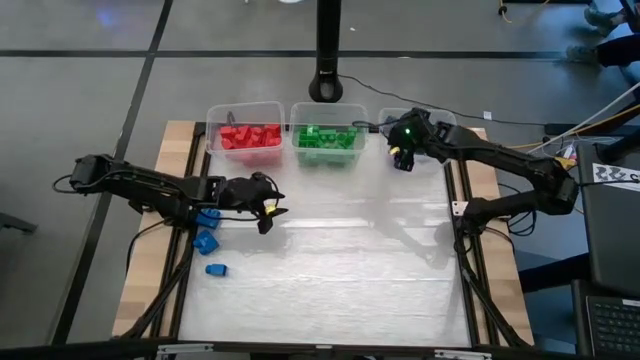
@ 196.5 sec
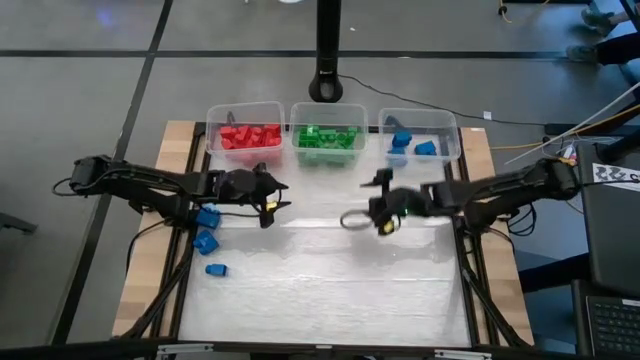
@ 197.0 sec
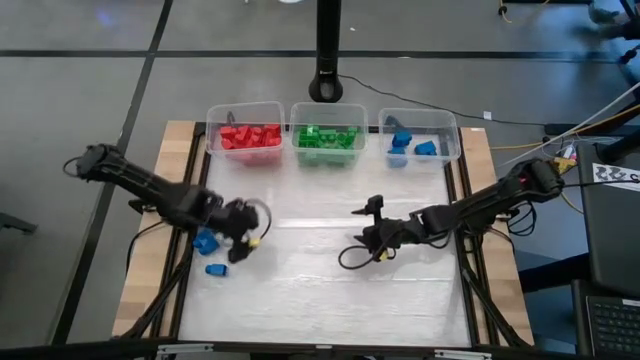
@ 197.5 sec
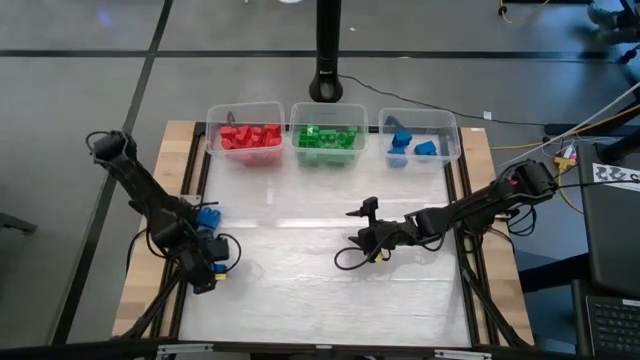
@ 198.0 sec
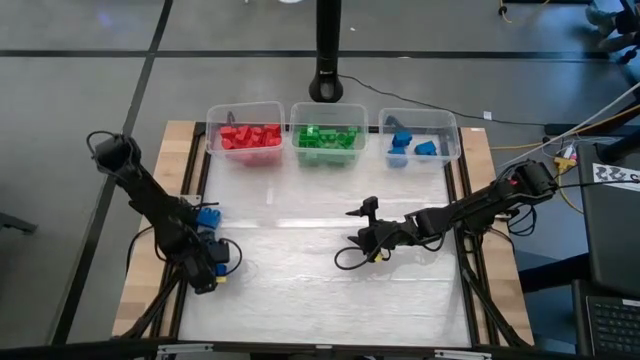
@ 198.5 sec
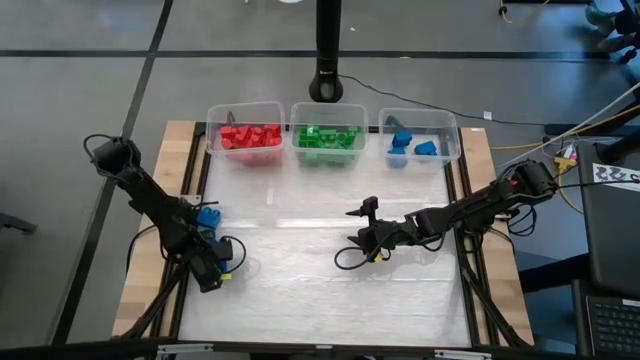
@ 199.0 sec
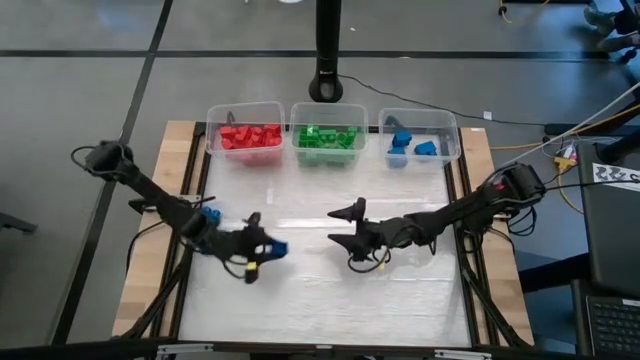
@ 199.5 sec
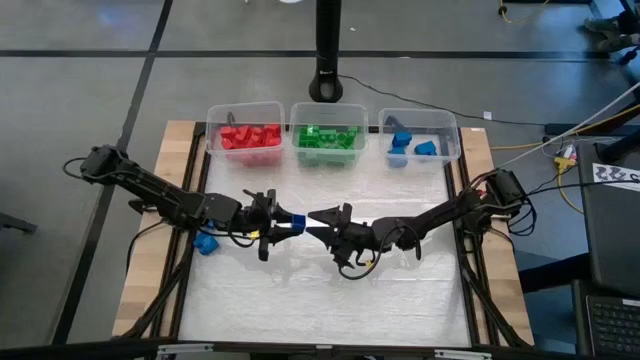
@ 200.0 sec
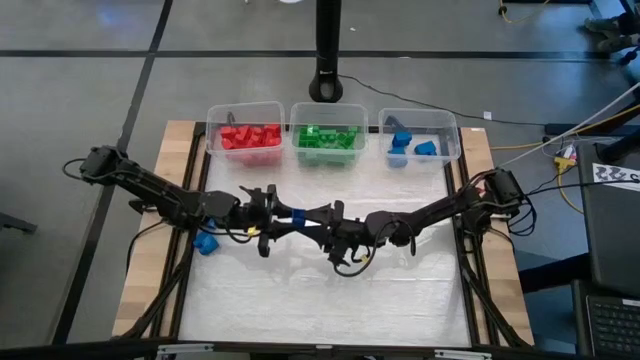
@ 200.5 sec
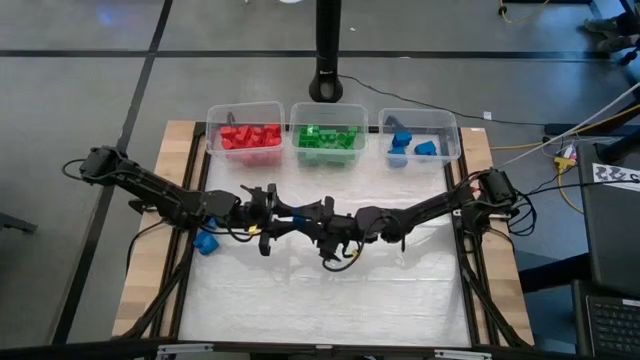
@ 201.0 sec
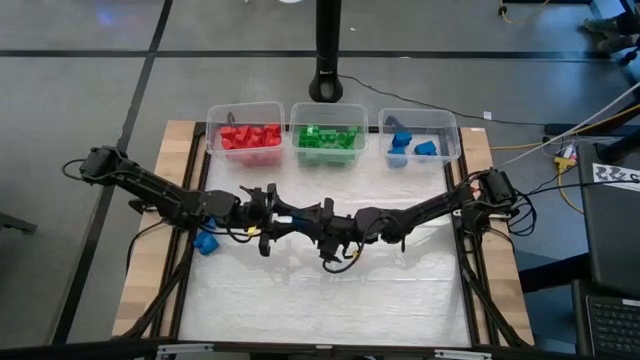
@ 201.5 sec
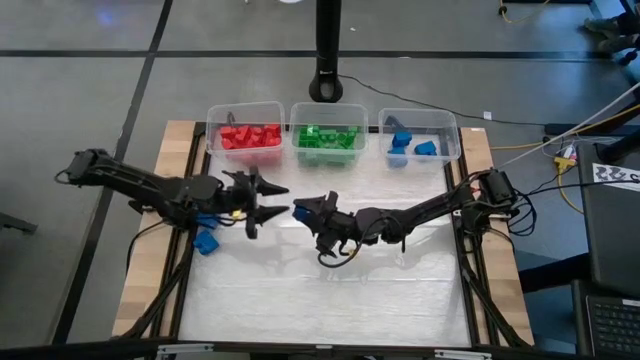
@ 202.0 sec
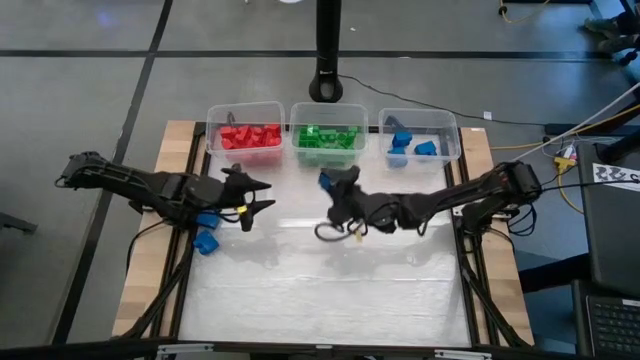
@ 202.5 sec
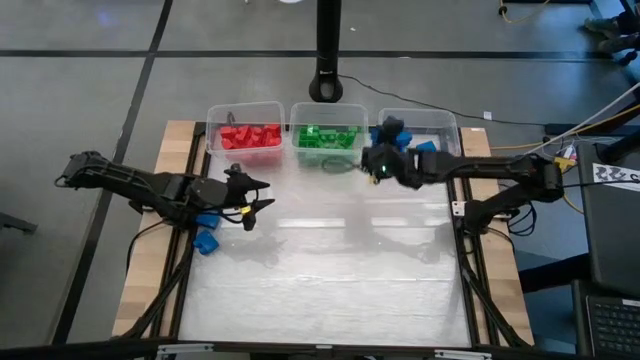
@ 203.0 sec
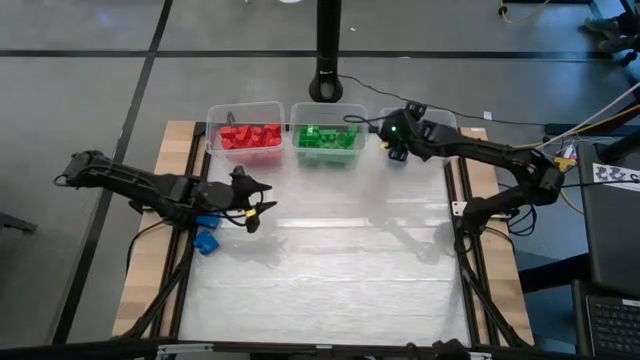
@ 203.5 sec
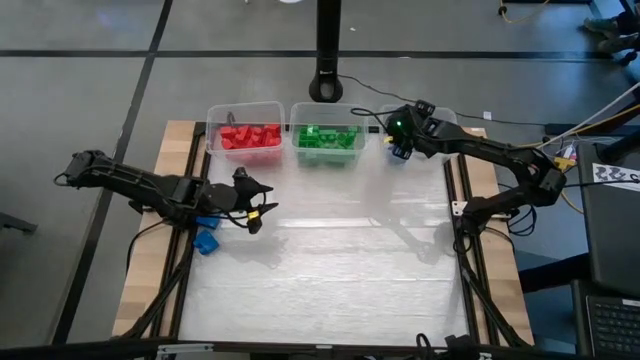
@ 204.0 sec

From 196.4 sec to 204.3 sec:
Task: Sort blocks
Put the blue game piece into the right transparent bin

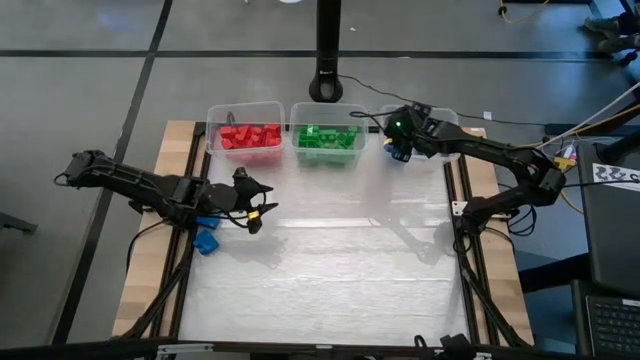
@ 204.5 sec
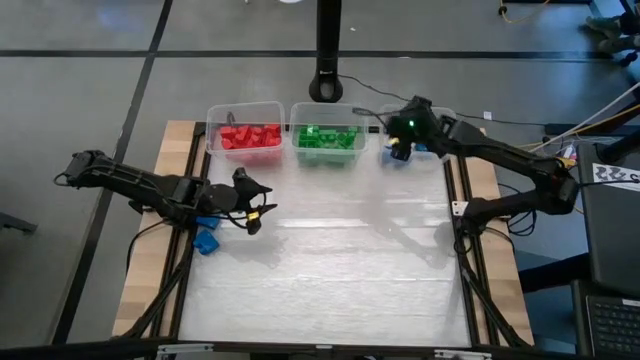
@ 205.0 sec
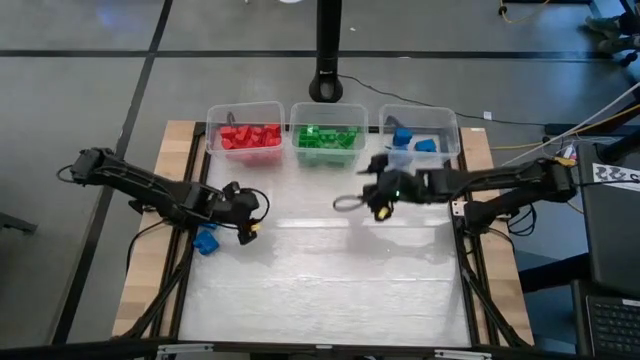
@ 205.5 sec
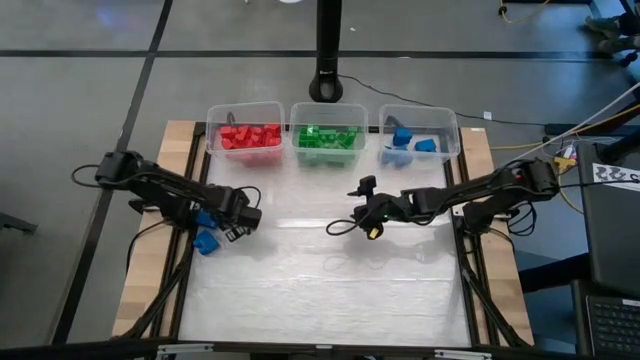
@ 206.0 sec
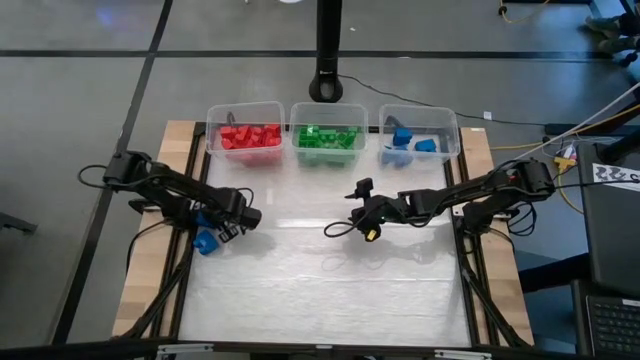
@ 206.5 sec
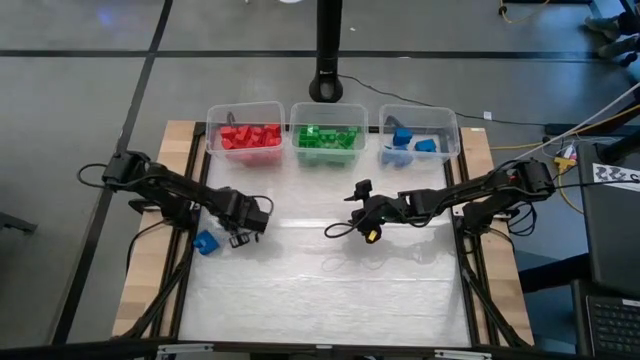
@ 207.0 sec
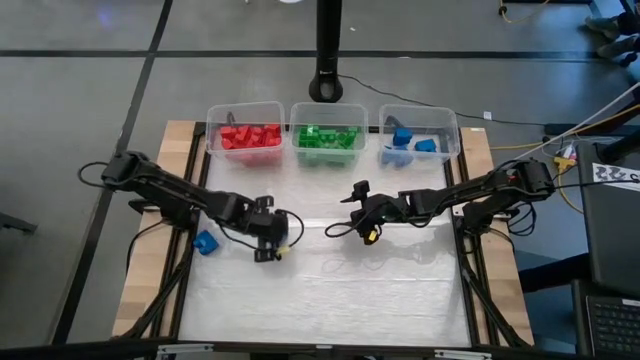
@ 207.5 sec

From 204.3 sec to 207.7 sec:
Prepare the blue game piece on the table

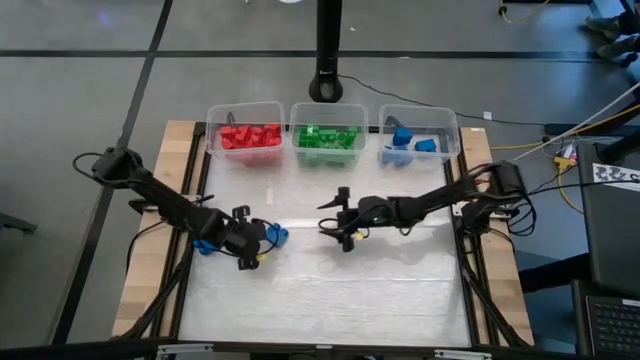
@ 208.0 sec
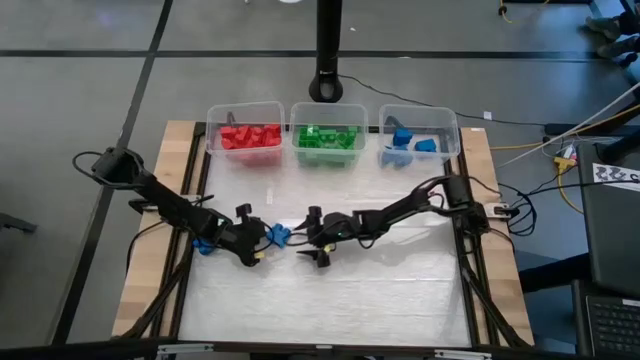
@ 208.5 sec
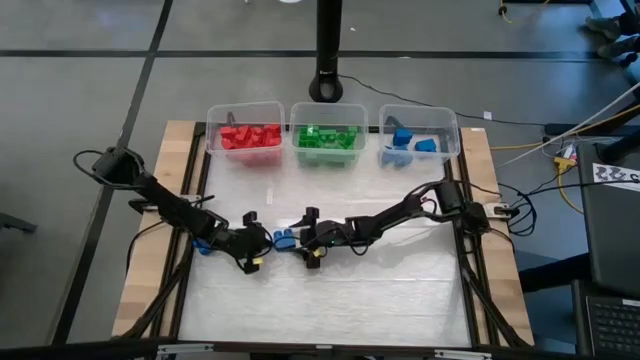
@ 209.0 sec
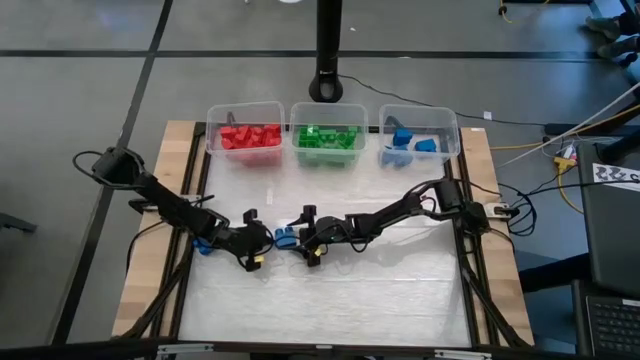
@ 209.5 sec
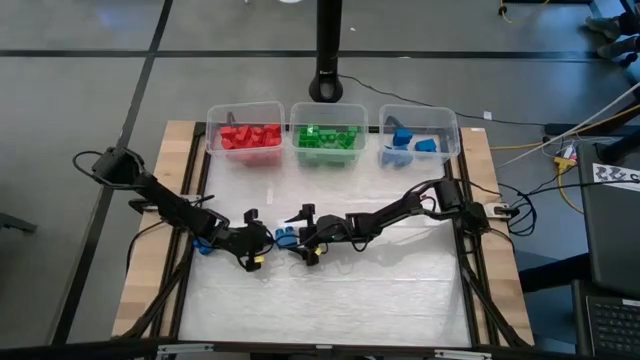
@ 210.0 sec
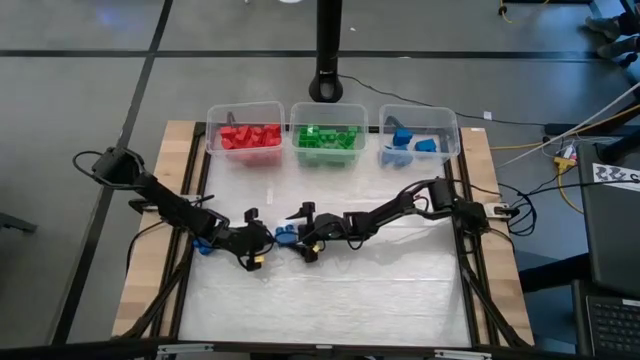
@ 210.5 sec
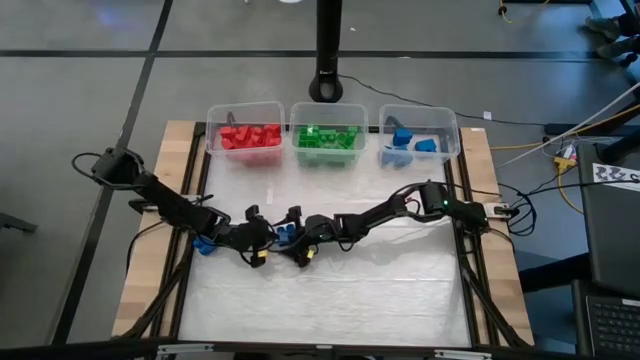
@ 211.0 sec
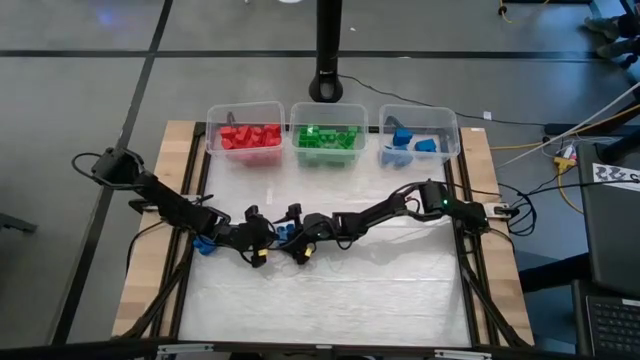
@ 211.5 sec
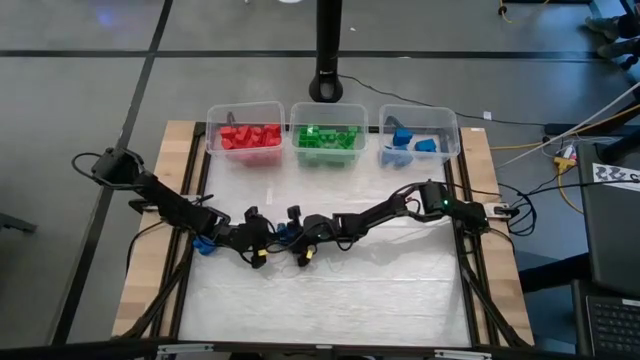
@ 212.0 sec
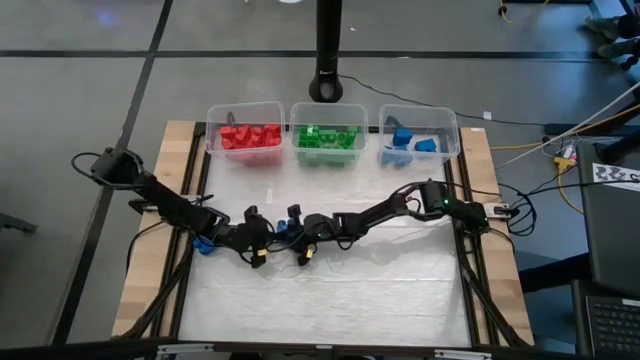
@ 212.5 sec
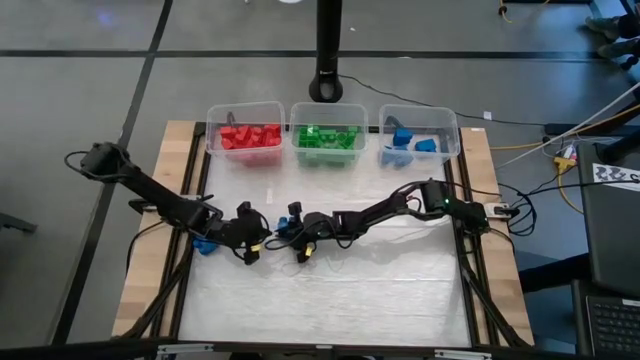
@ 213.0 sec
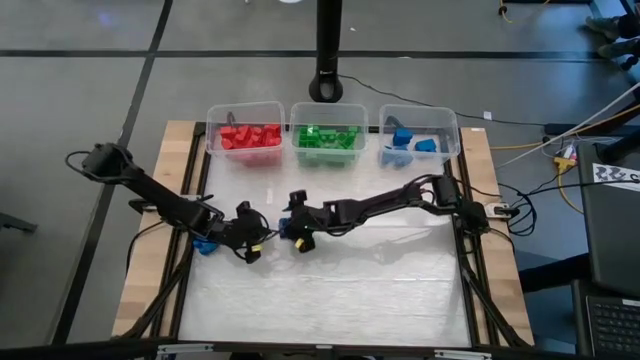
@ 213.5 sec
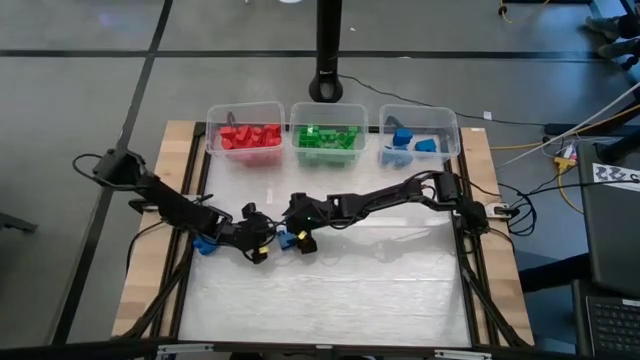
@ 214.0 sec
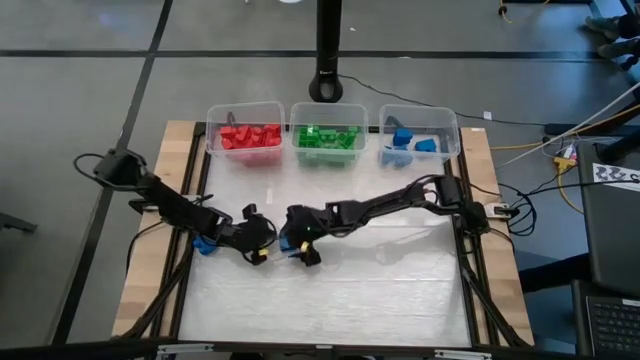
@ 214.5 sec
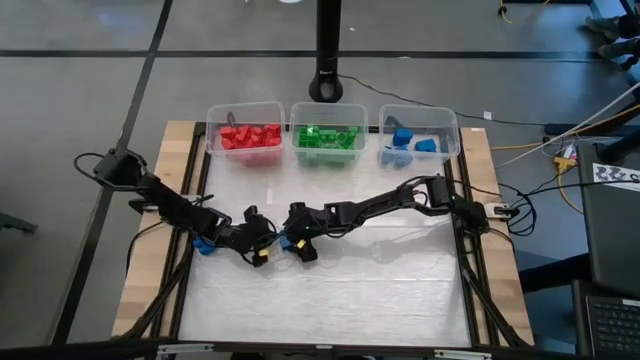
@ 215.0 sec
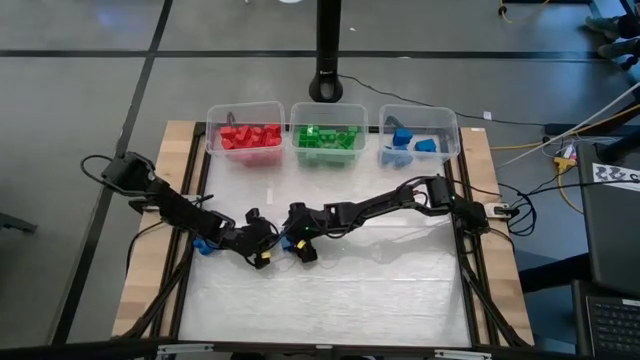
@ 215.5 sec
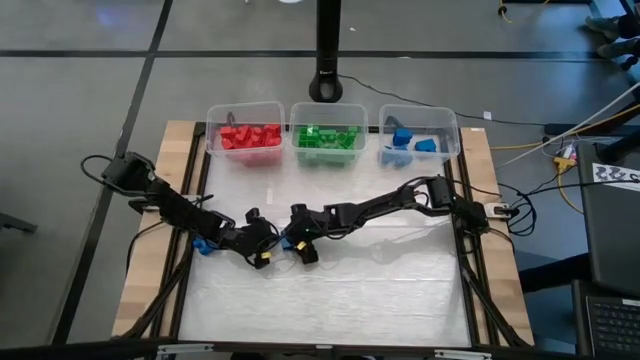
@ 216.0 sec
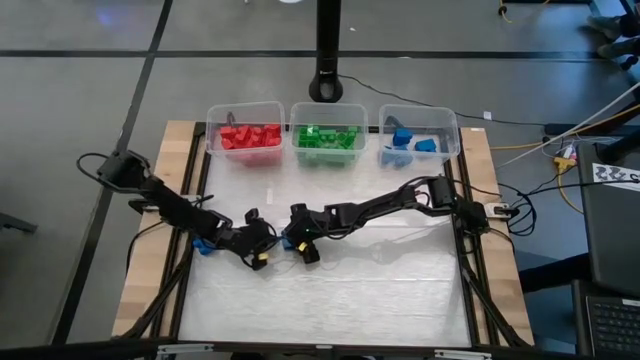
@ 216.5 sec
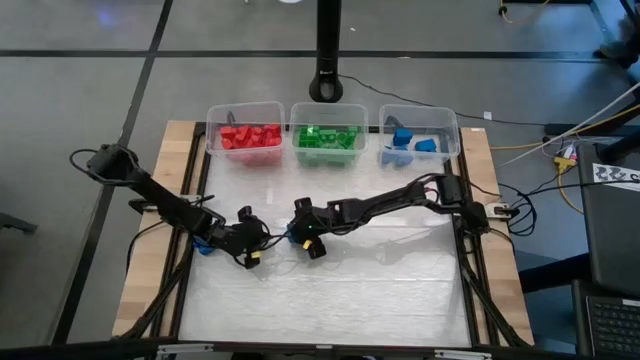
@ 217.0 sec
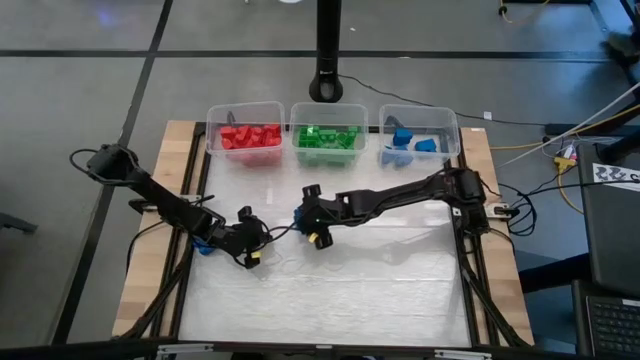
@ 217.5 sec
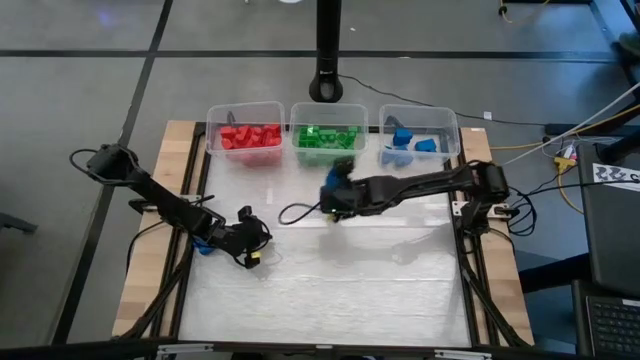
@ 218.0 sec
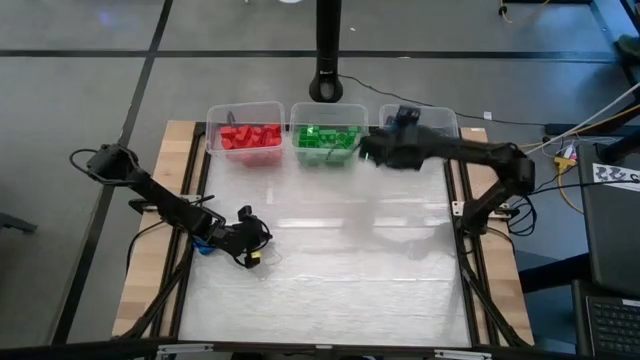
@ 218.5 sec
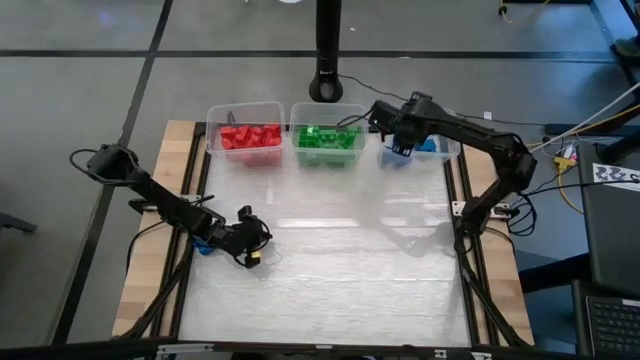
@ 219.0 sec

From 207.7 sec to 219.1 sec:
Put the blue game piece into the right transparent bin
